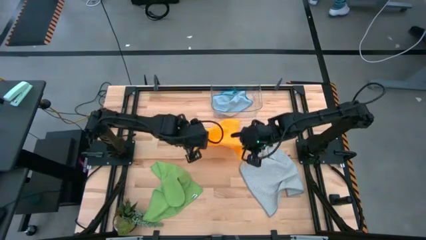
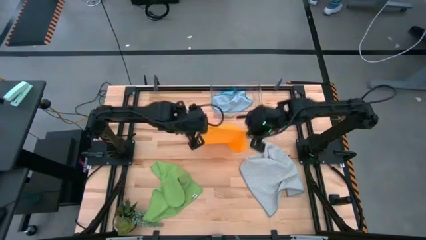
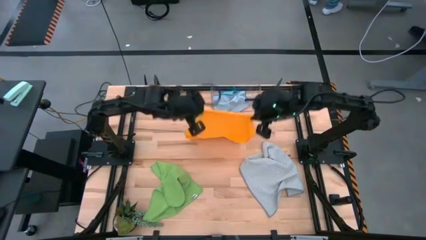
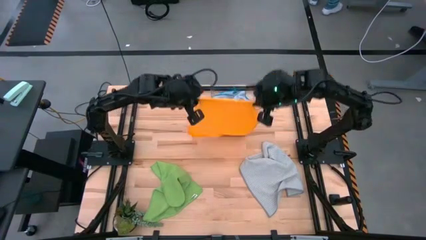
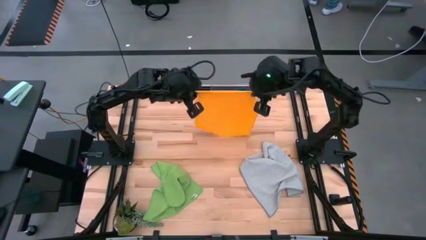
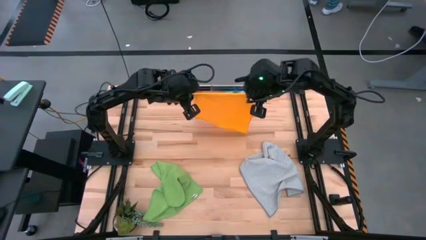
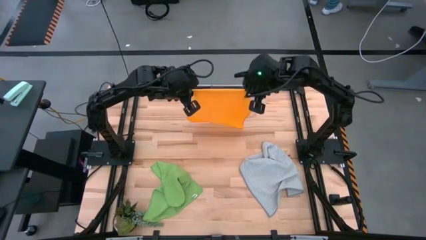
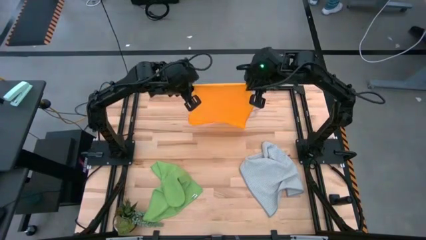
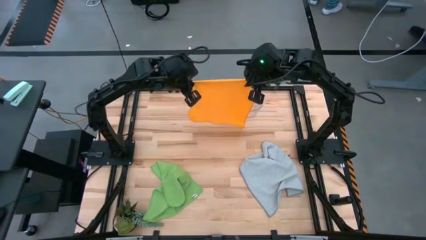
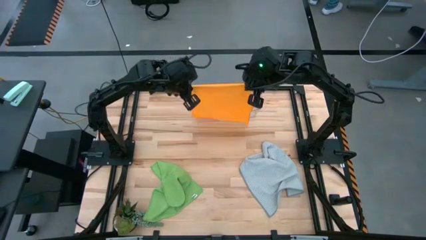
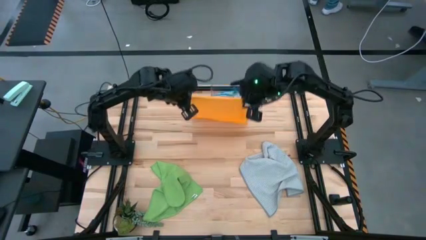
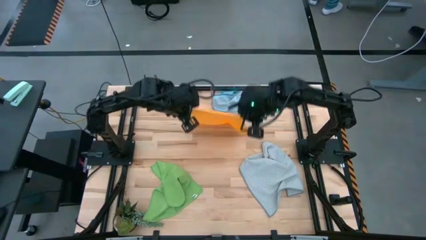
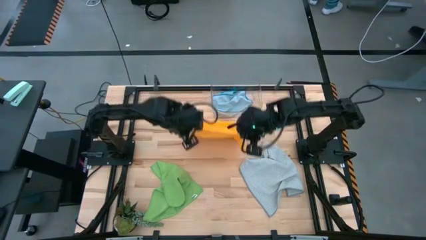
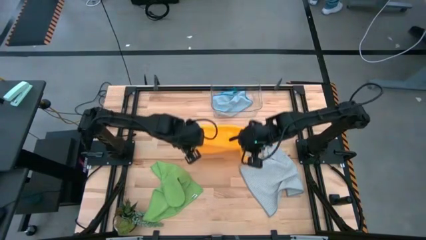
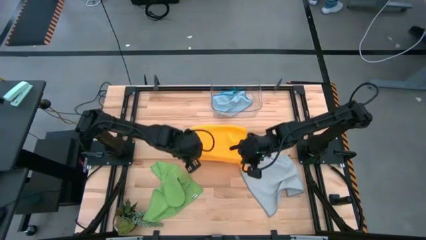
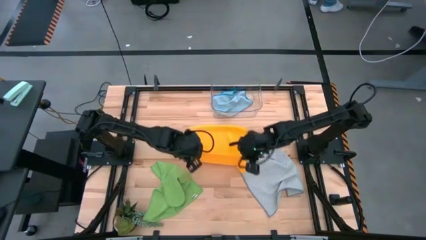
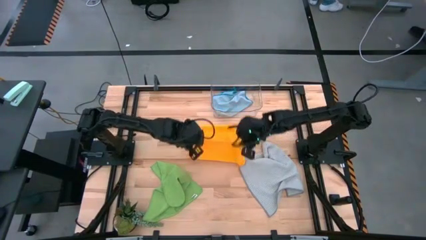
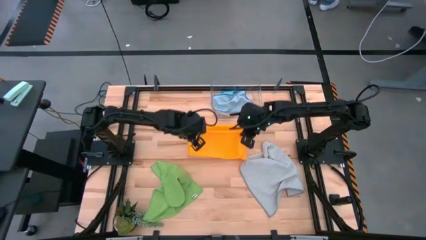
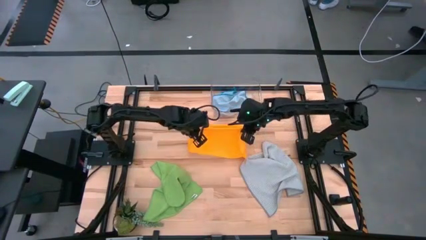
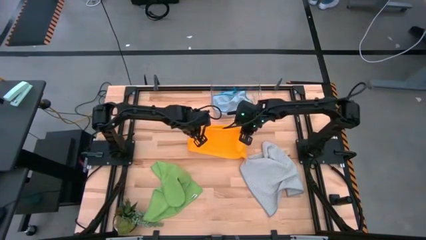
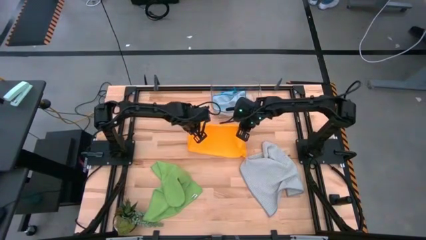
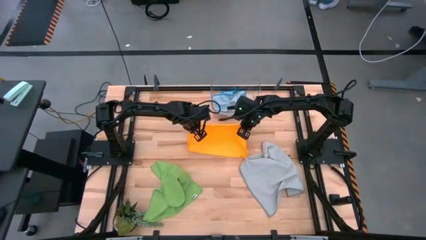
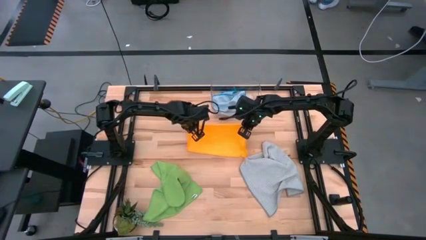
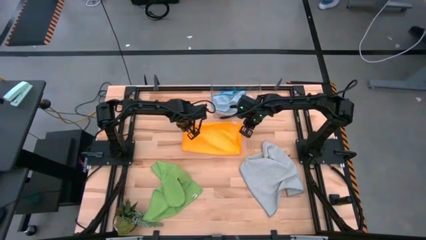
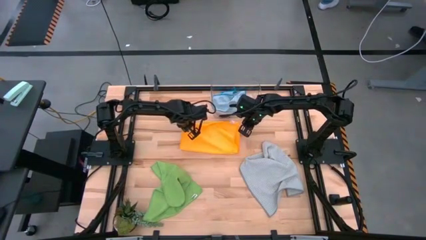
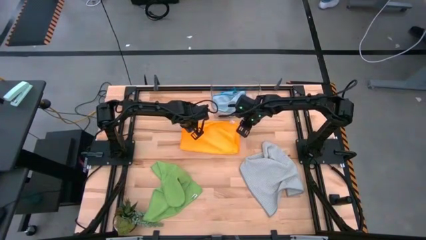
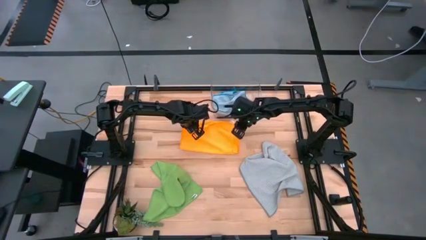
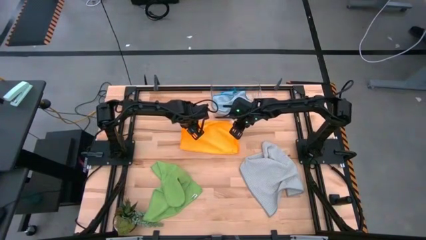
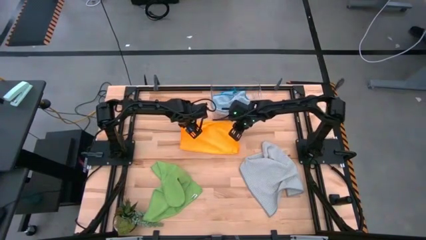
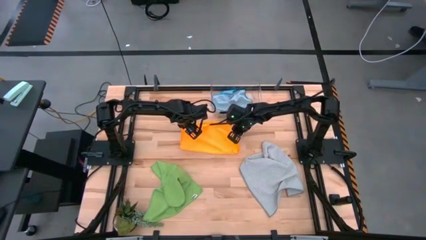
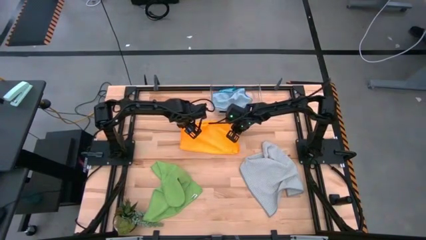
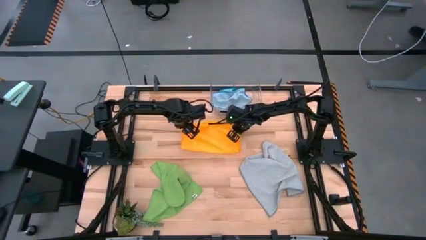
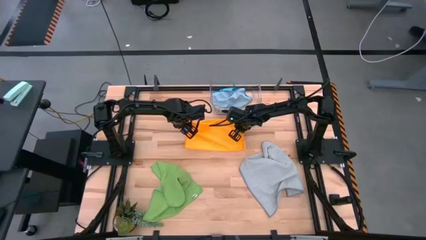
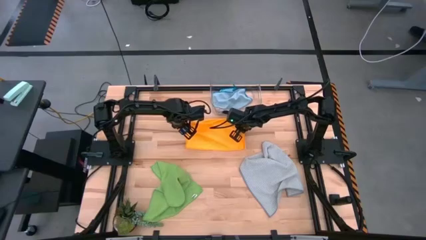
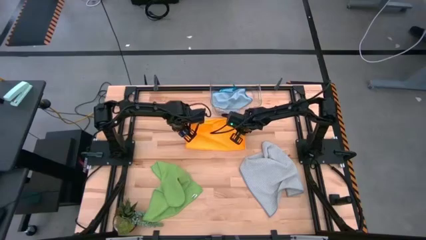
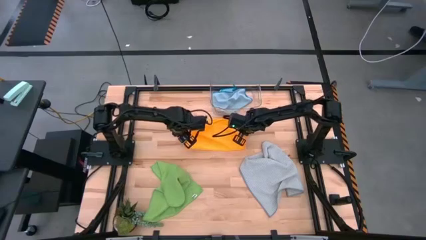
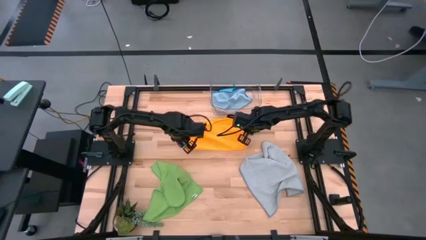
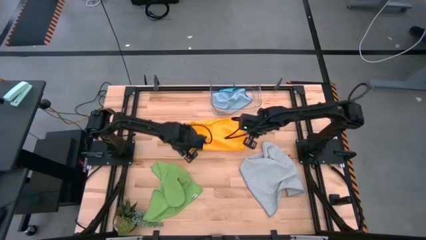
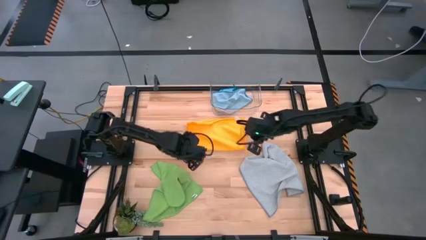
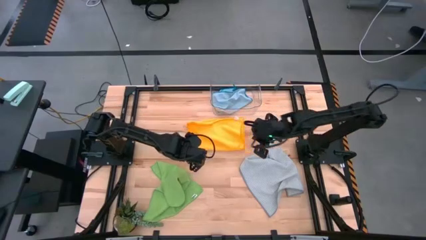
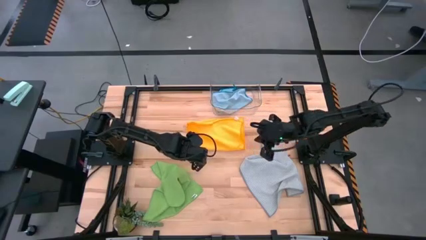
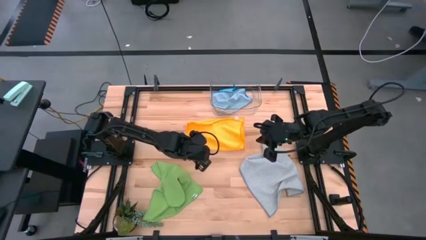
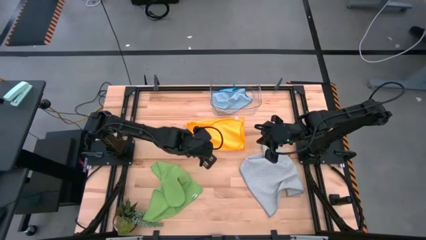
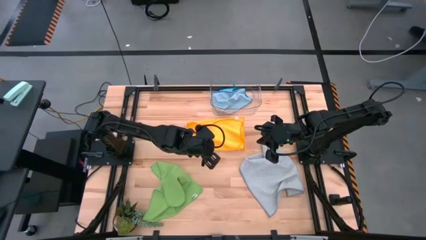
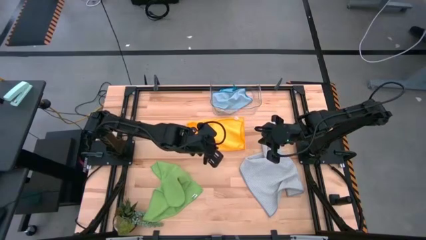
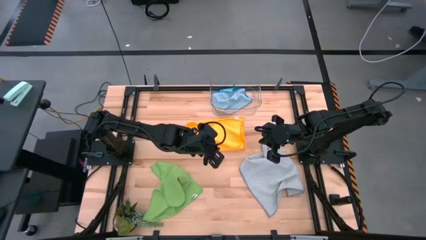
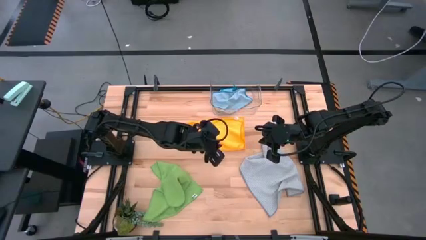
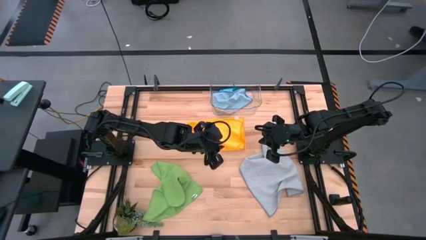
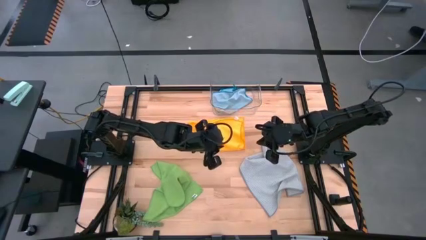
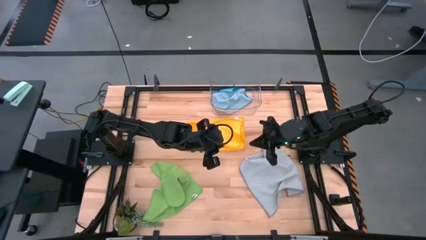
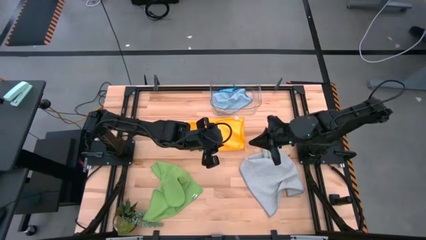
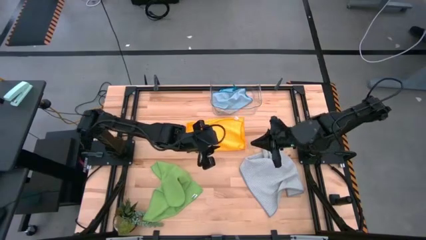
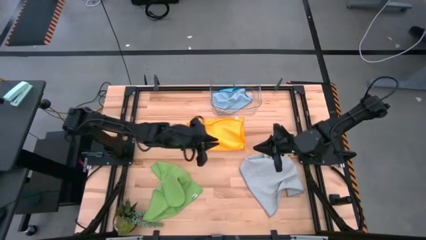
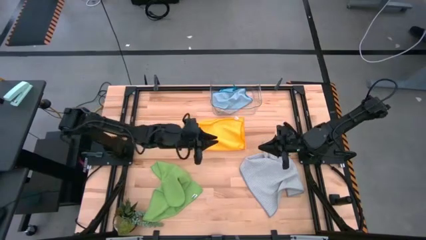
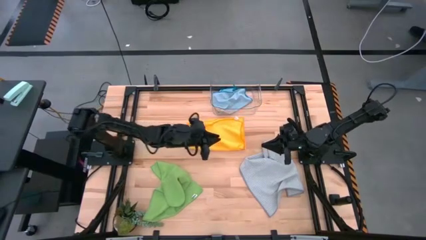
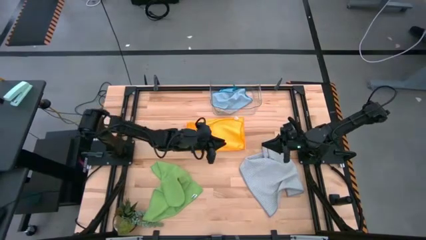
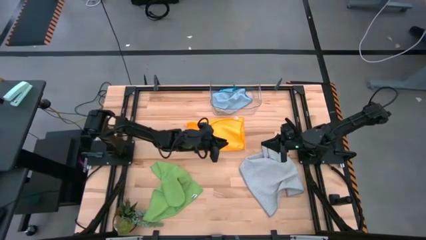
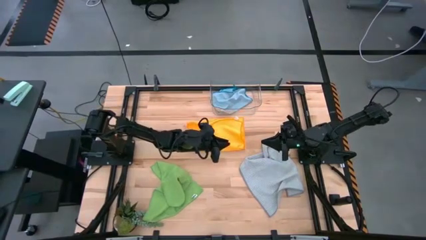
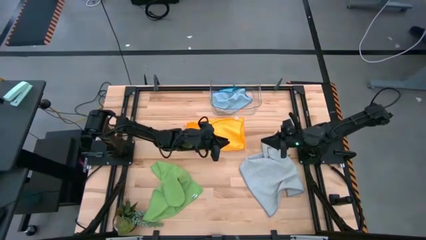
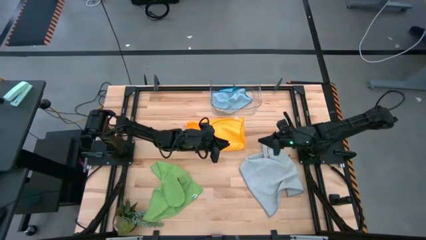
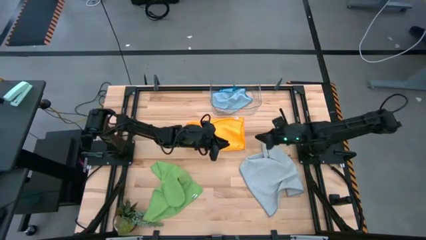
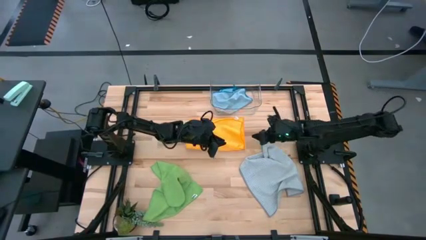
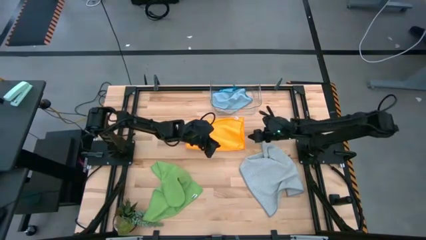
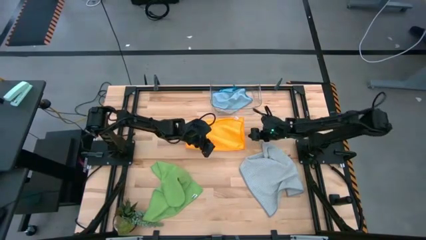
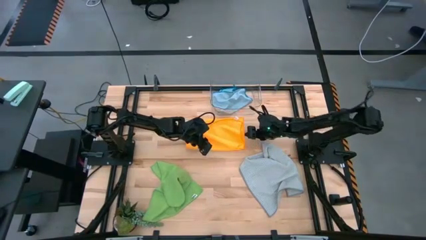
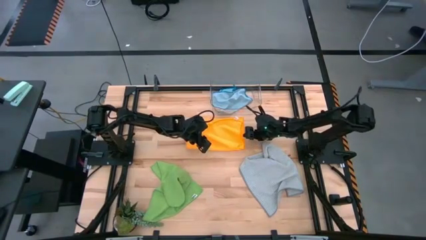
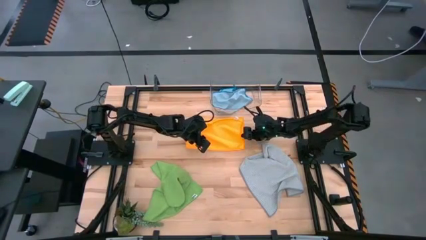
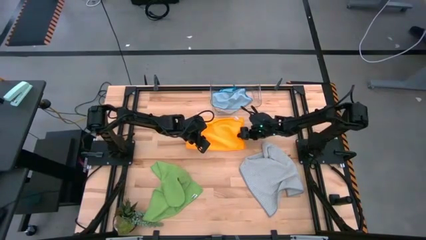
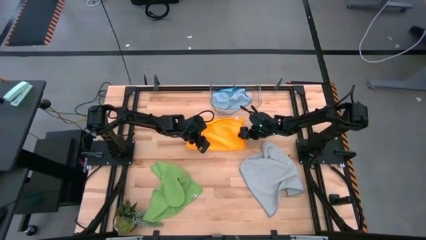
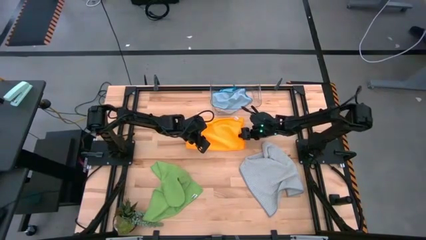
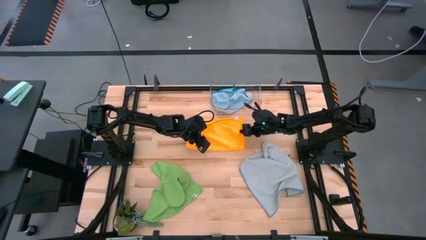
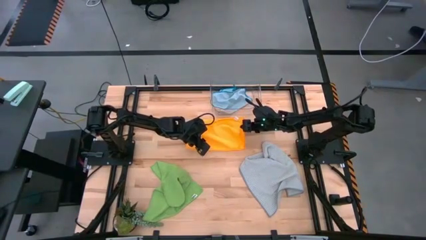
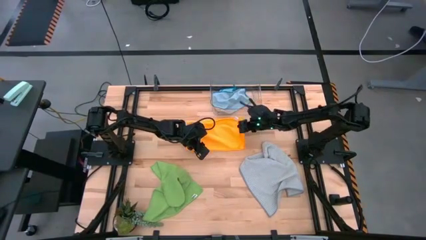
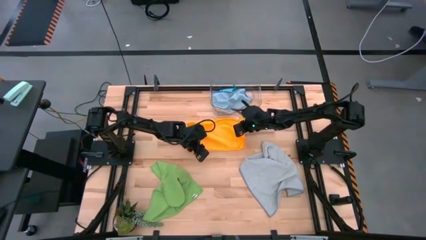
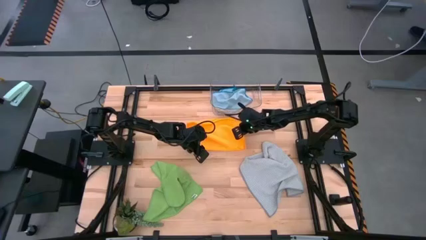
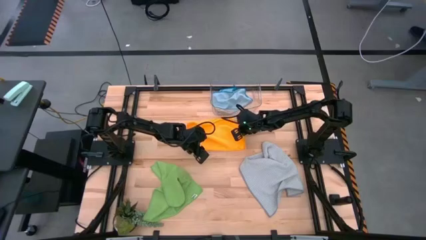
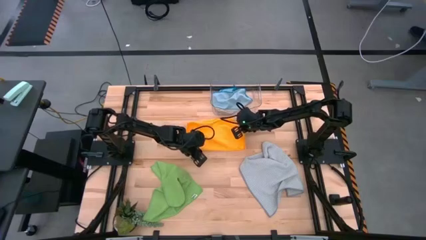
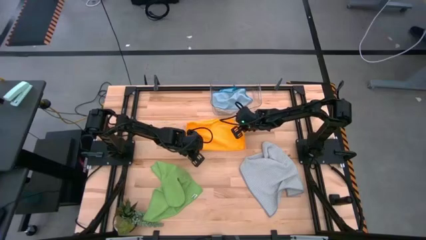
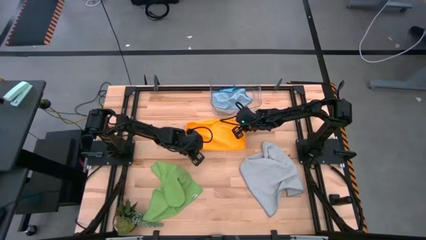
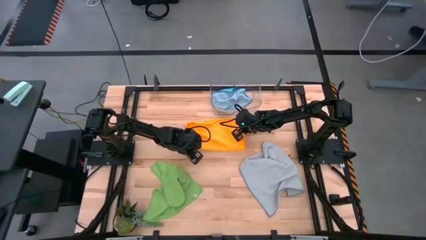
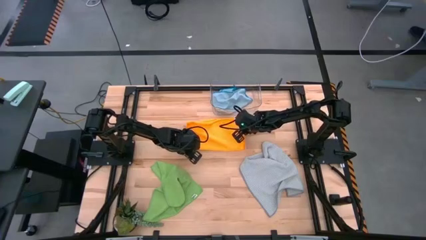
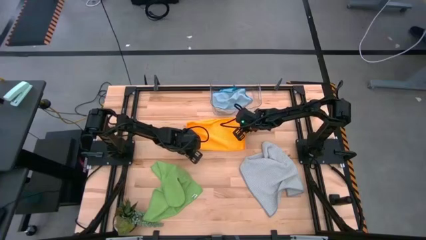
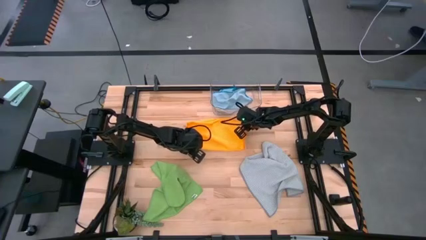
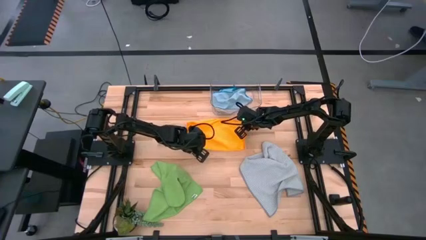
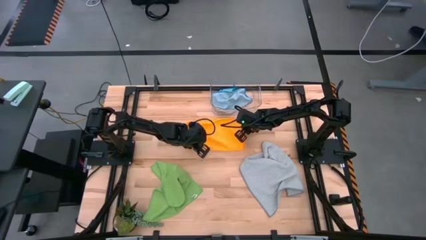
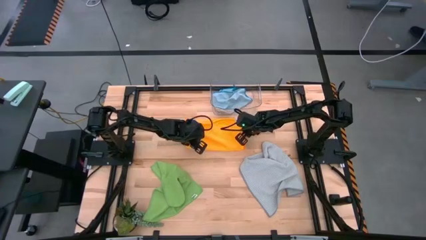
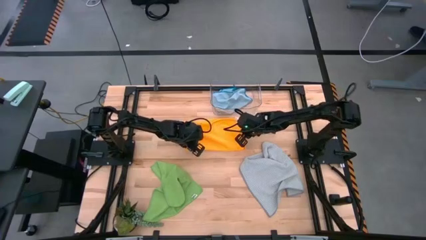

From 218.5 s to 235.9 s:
Task: Fold microfiber towels
Fold the orange microfiber cloth
